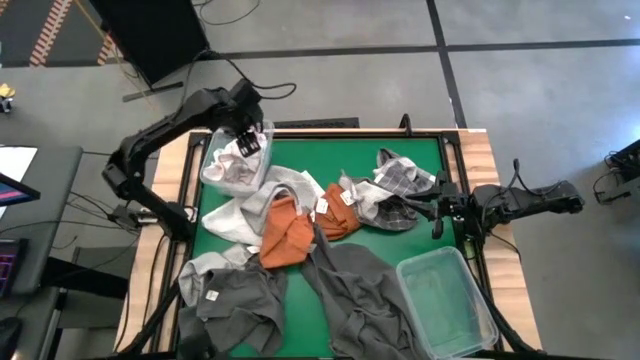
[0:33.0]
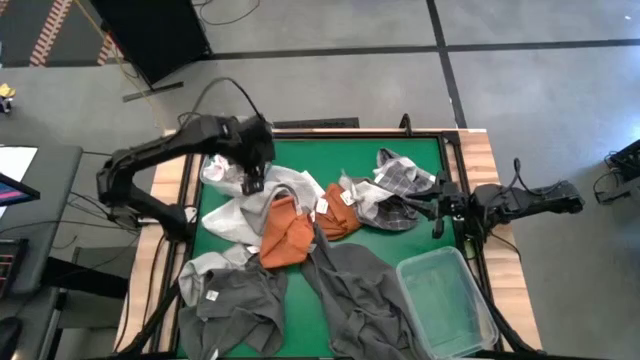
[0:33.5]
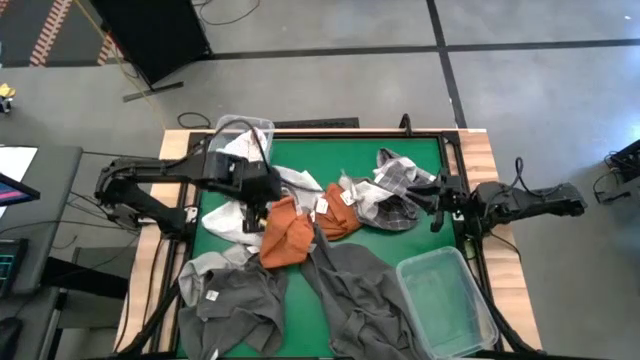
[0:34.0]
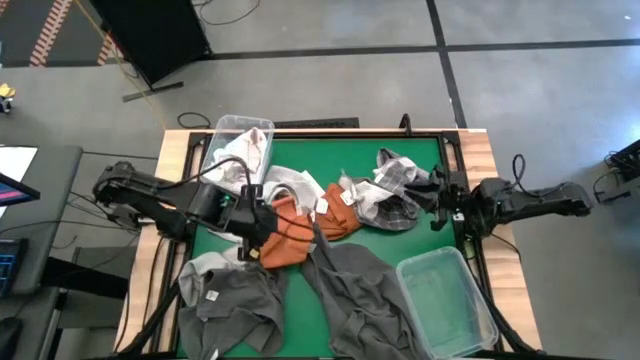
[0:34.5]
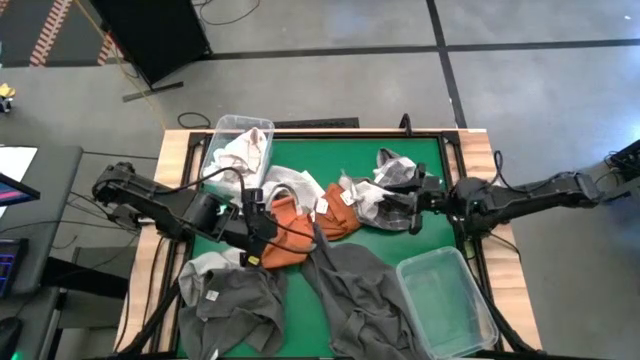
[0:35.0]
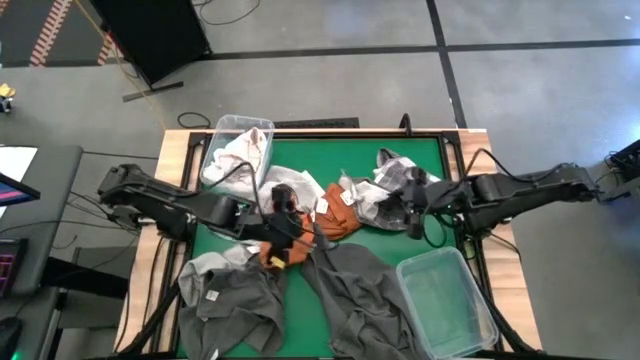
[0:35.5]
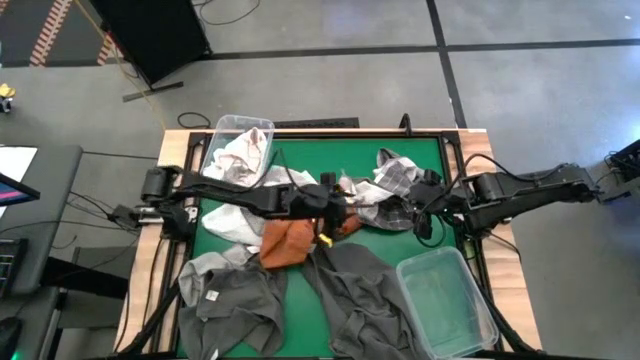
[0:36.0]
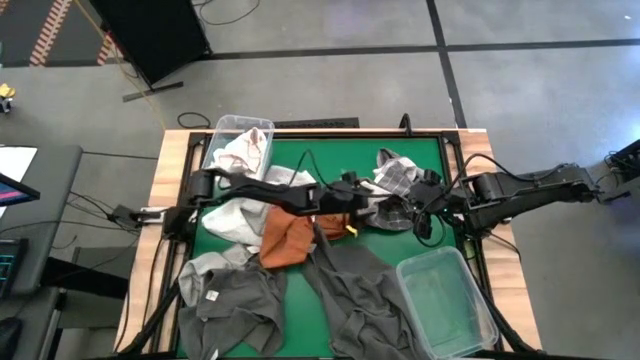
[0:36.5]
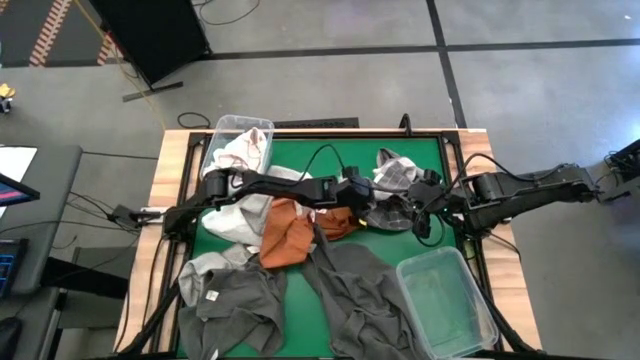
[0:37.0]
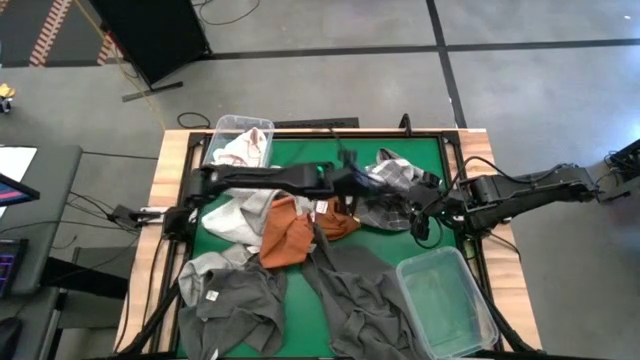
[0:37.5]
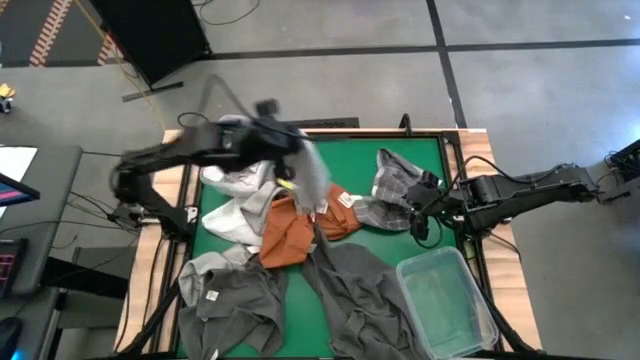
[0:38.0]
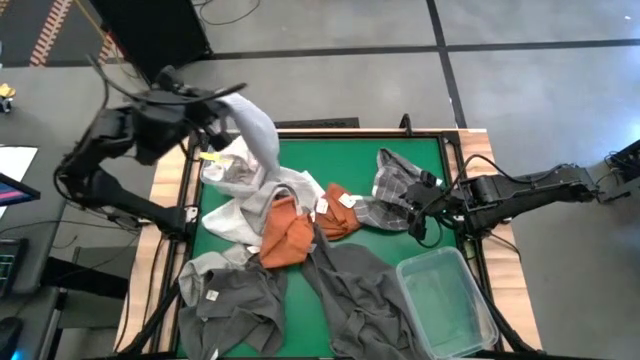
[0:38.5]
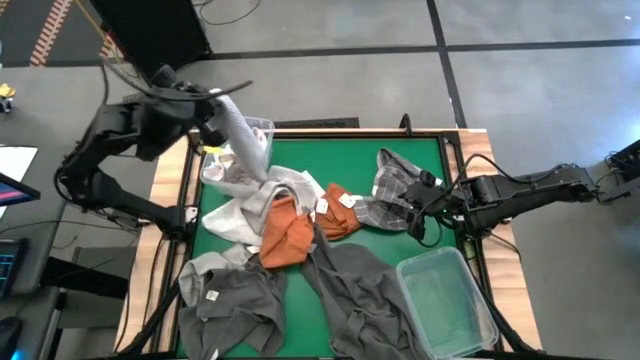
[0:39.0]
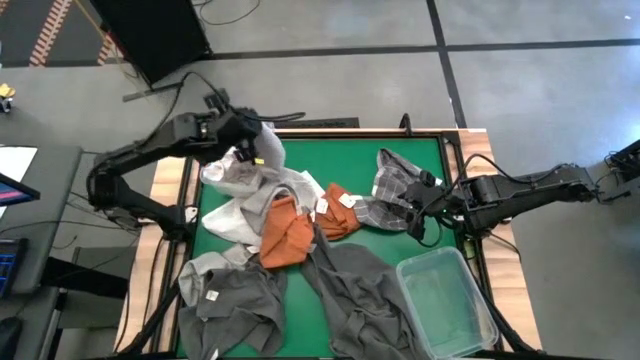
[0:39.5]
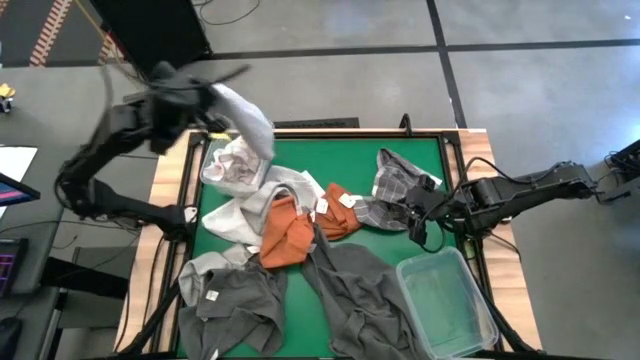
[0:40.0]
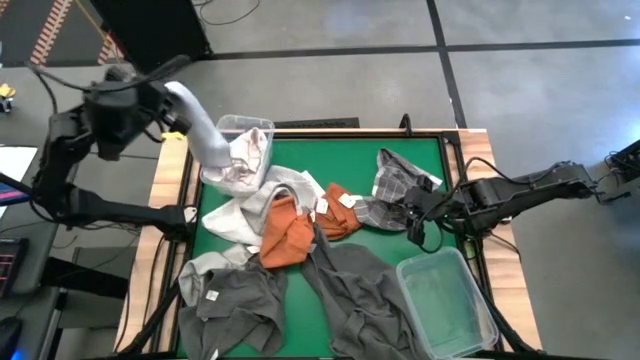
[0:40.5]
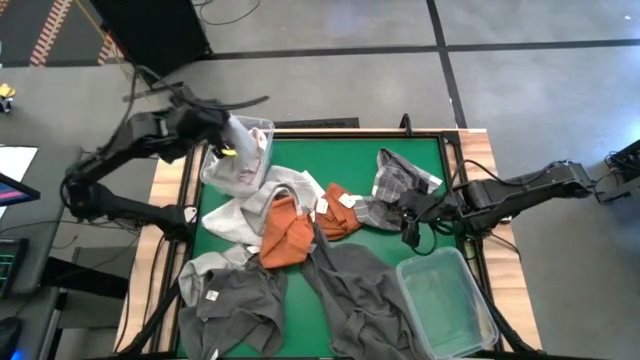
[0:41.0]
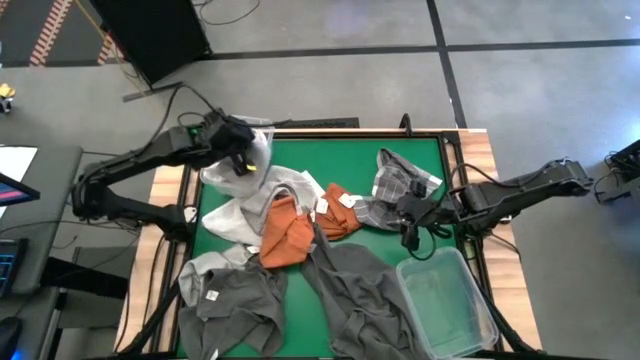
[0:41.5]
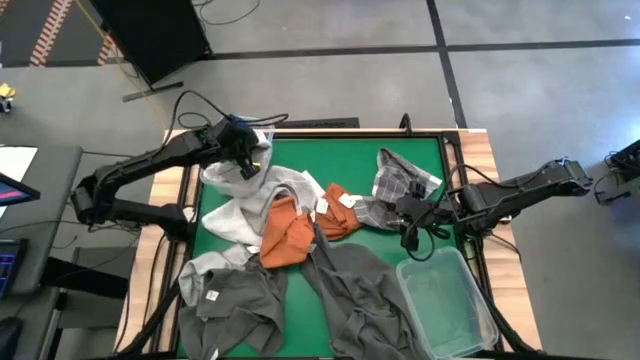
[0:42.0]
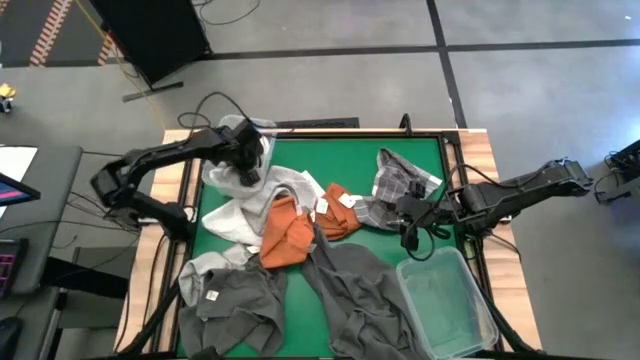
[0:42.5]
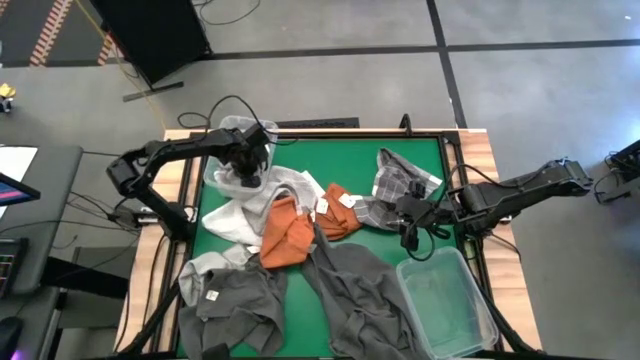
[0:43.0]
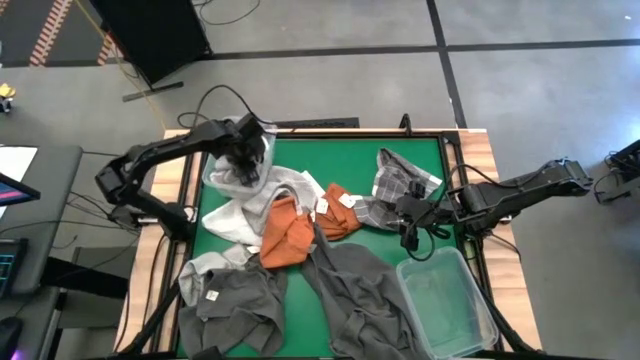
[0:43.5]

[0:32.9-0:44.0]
Task: Sort towels by color in basket
Put the right light gray towel into the top transparent bin

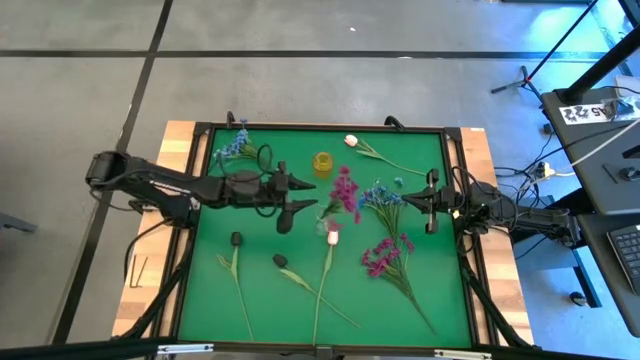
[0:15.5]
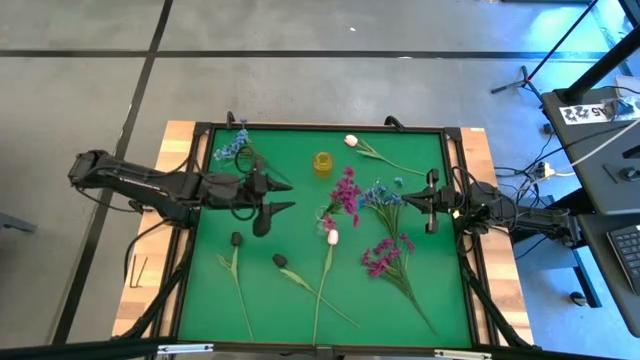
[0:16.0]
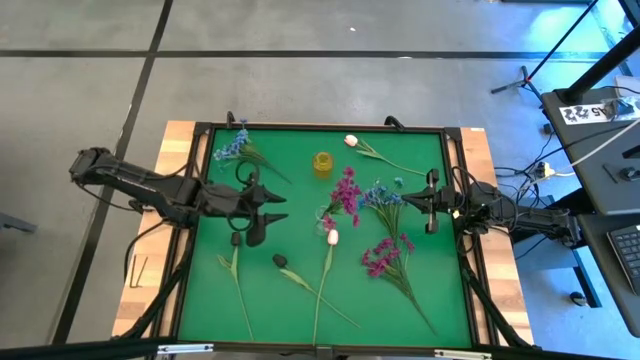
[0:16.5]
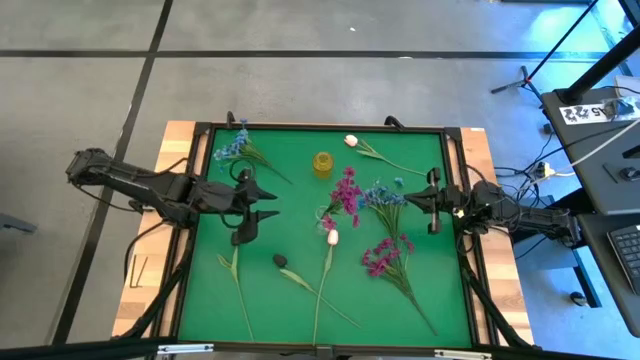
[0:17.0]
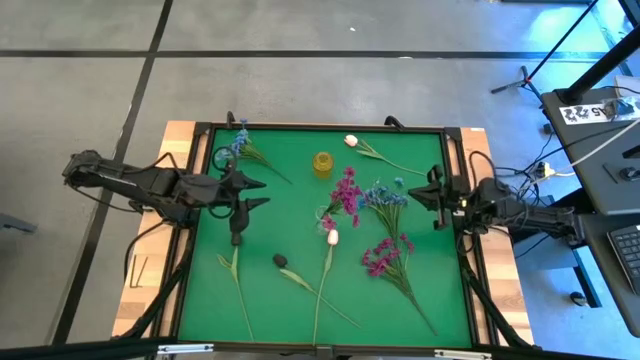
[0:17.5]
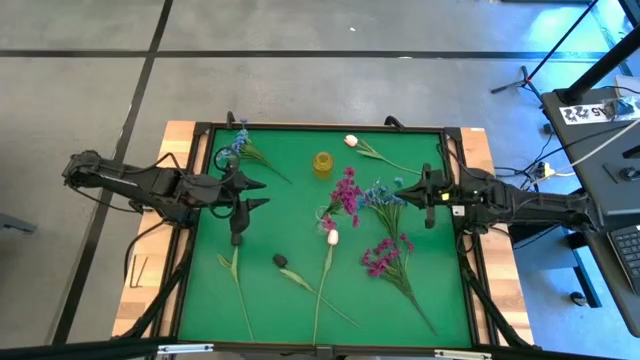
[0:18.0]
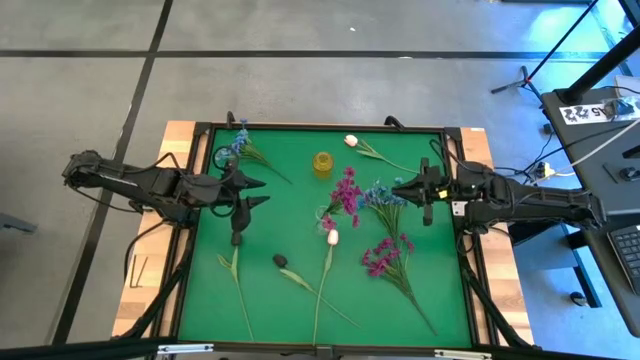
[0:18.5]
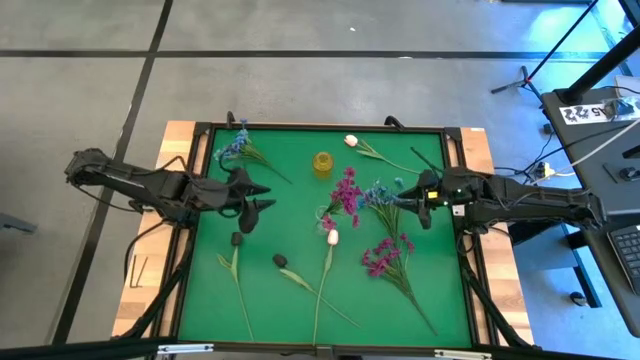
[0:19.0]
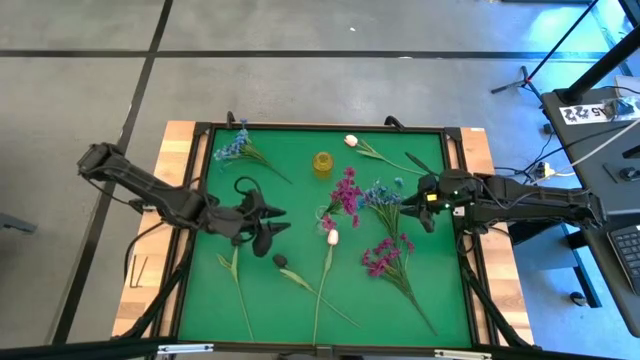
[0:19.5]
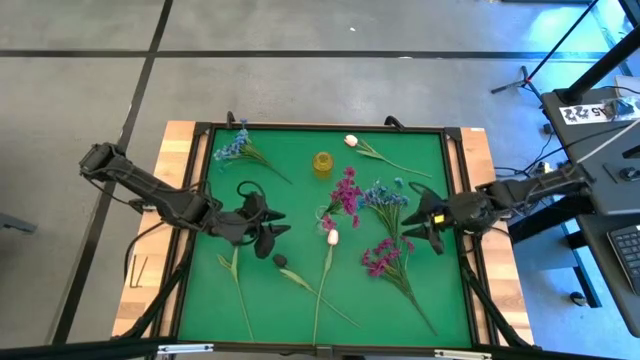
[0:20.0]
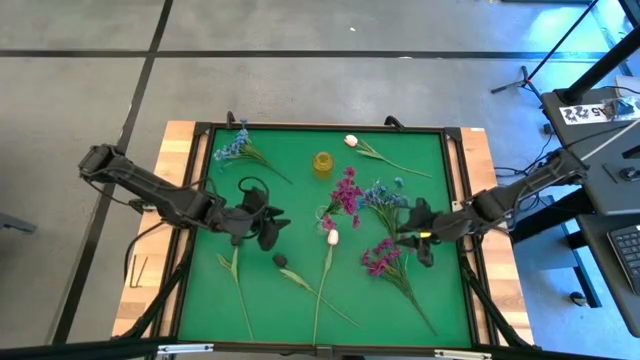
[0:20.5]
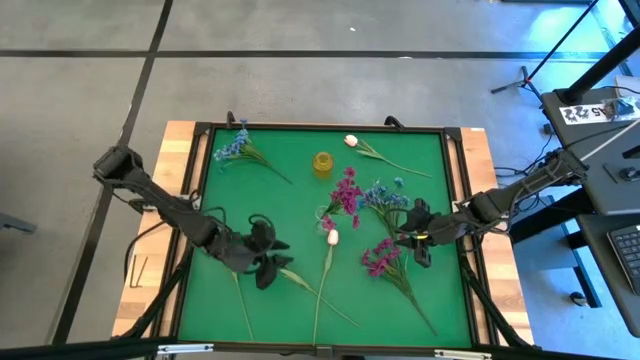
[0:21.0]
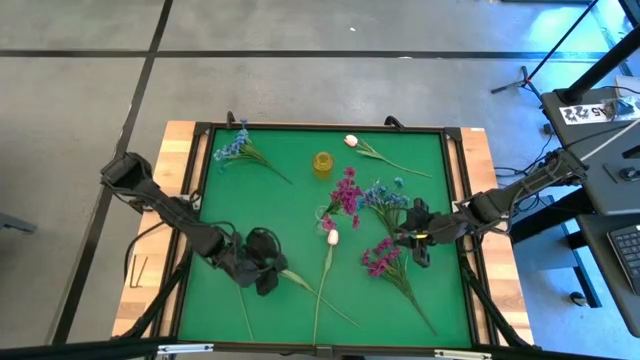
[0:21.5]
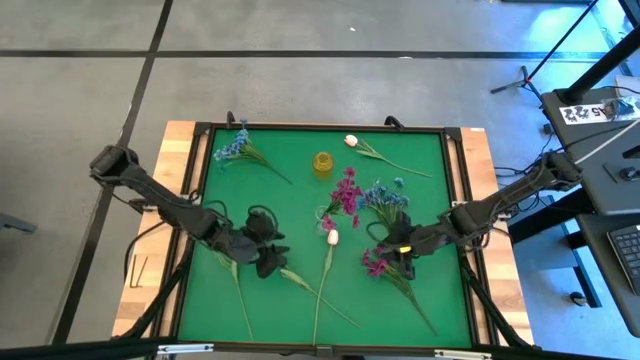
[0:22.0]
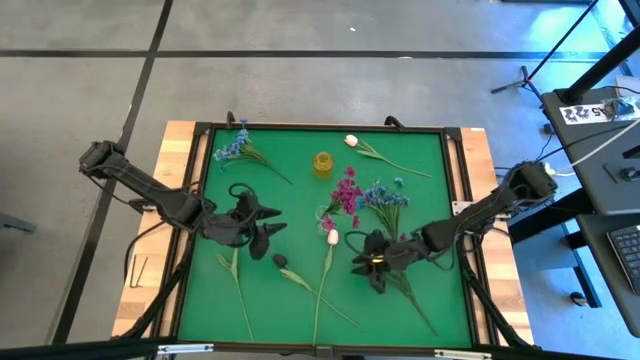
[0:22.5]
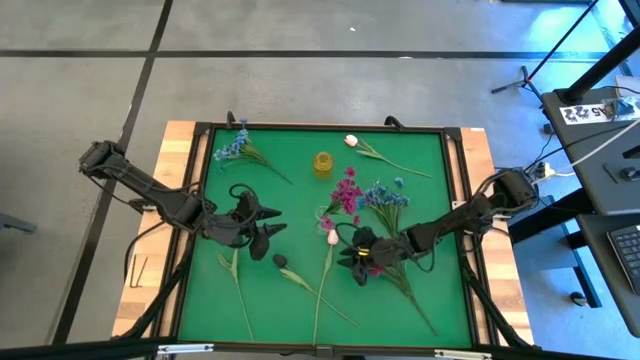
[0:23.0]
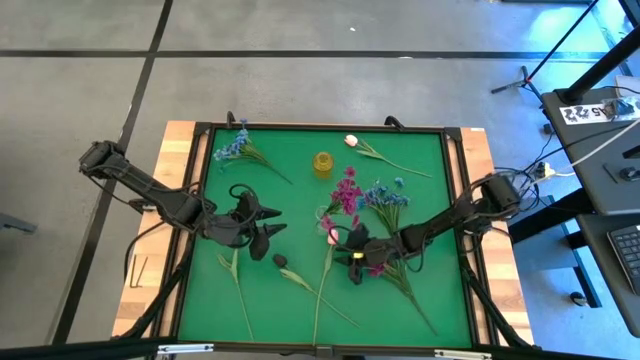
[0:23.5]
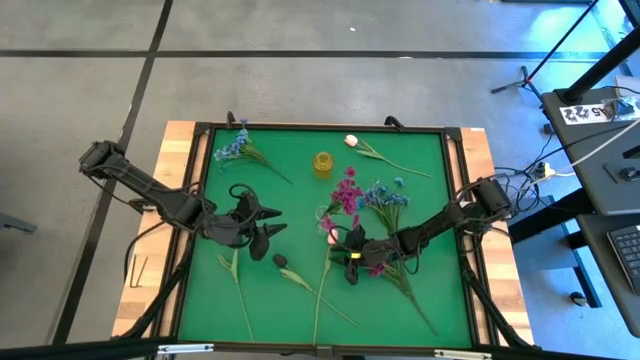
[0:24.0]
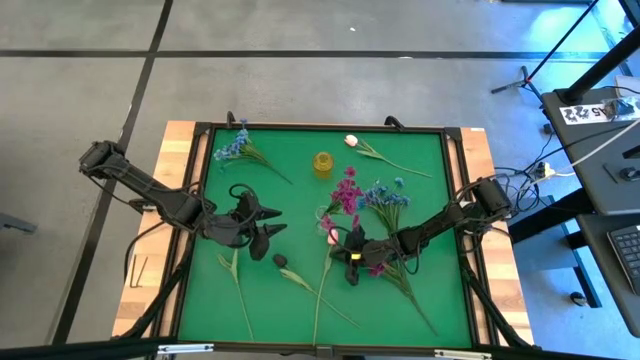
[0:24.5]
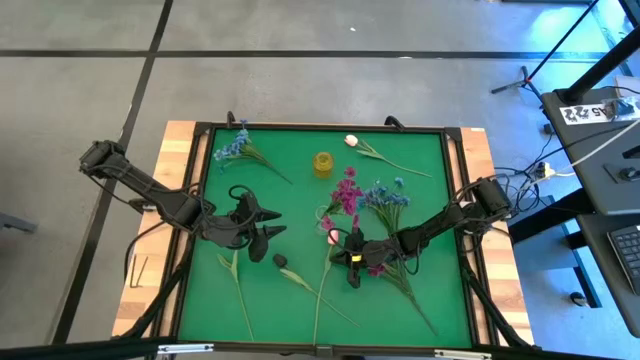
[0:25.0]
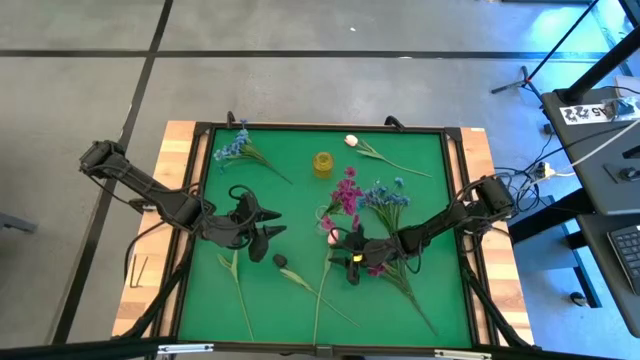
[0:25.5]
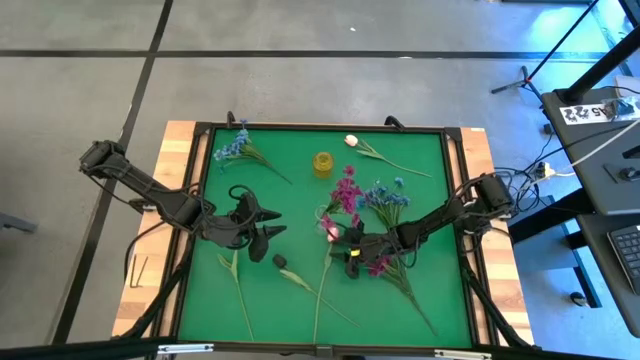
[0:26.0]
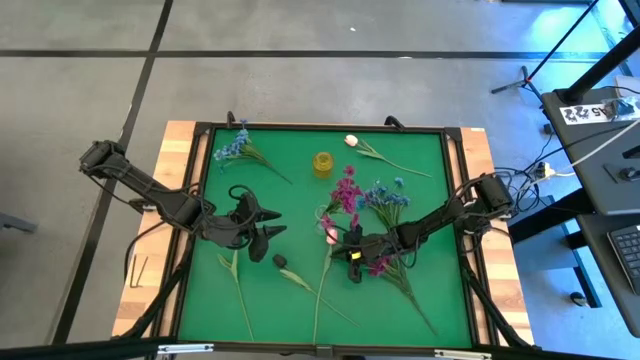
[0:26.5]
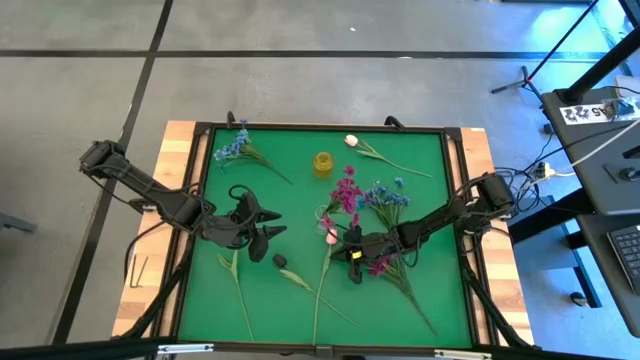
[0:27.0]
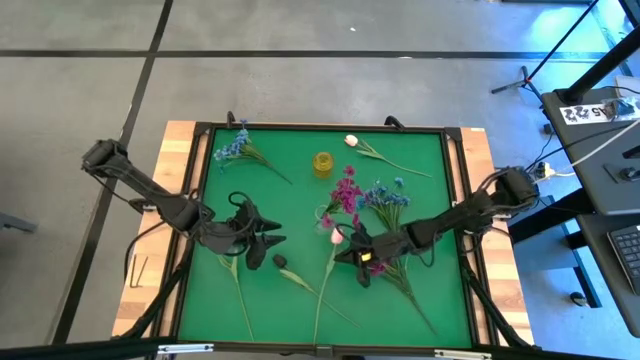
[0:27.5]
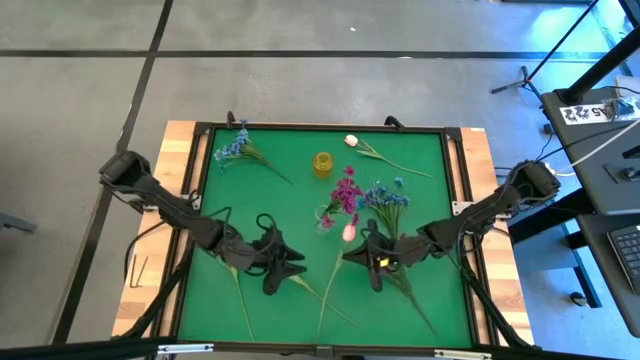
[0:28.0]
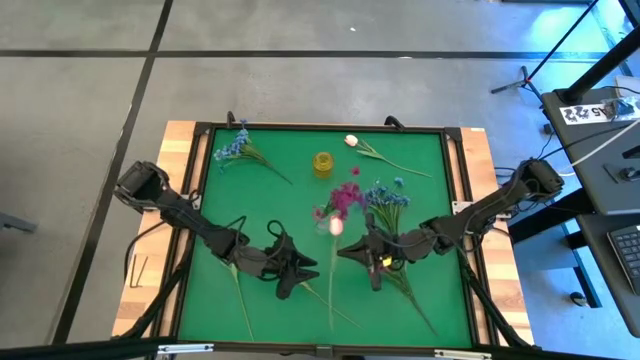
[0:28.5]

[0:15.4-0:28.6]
Task: Sort flowers into vase by color
Put the bottom pink flower into the yellow vase
